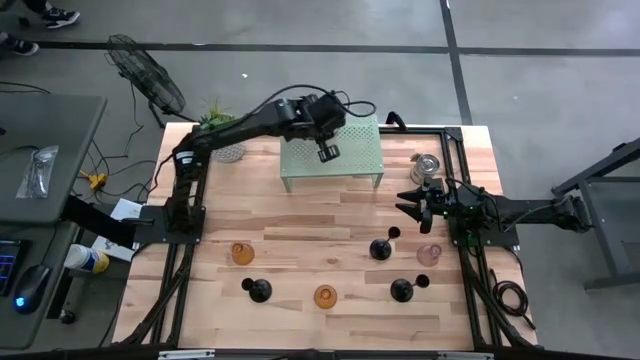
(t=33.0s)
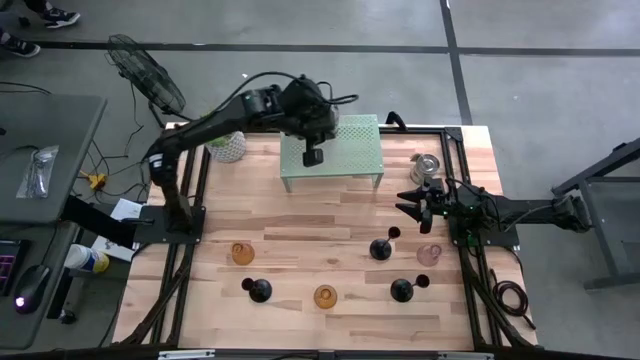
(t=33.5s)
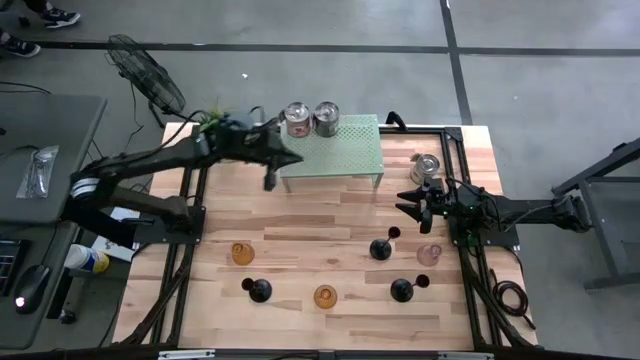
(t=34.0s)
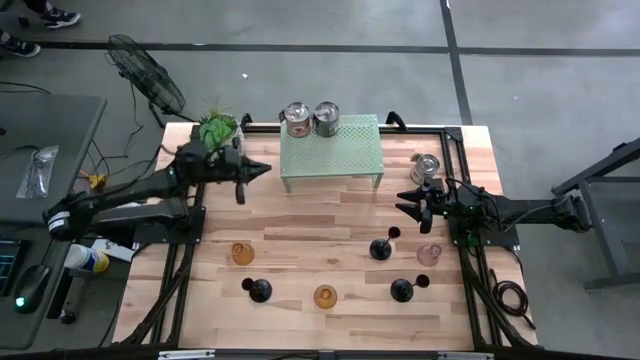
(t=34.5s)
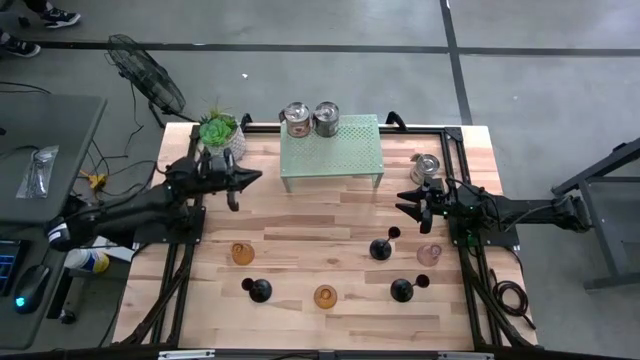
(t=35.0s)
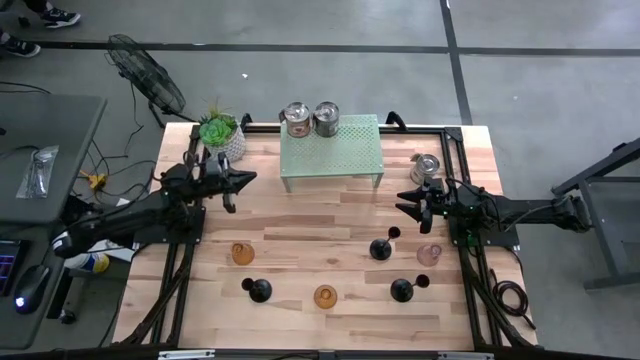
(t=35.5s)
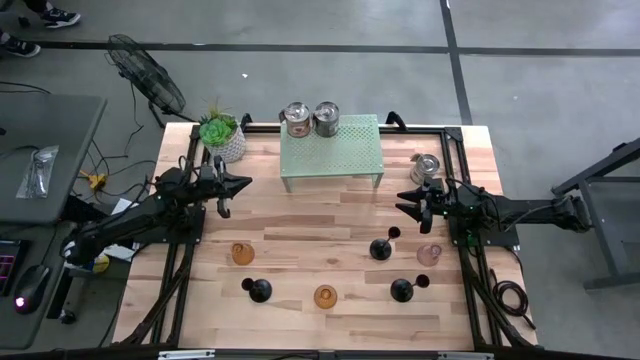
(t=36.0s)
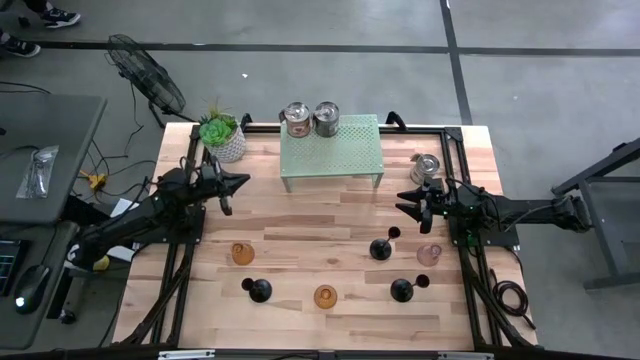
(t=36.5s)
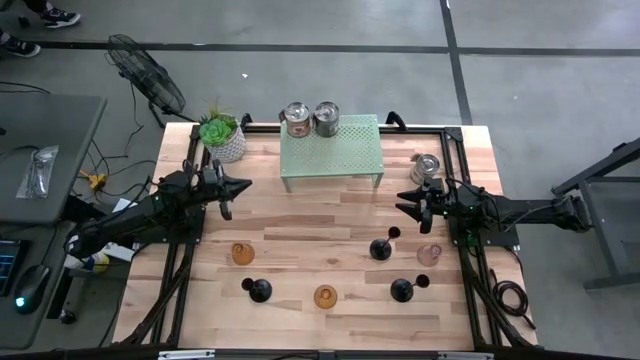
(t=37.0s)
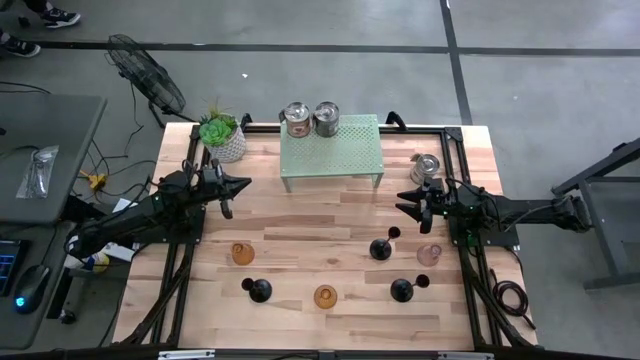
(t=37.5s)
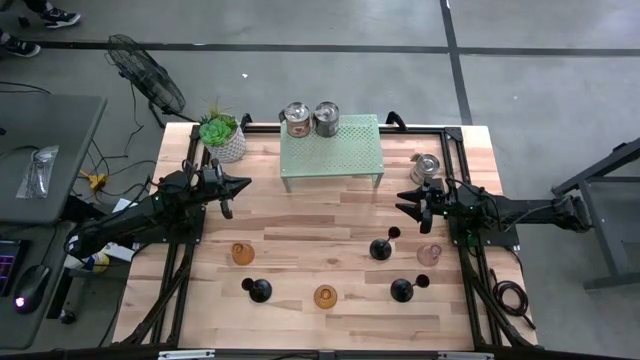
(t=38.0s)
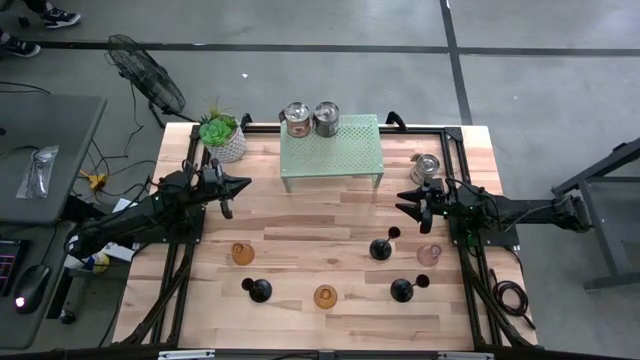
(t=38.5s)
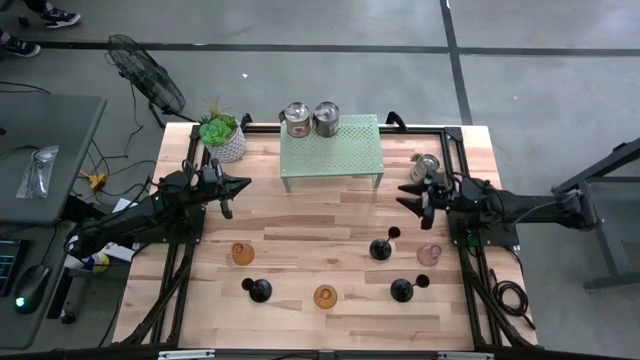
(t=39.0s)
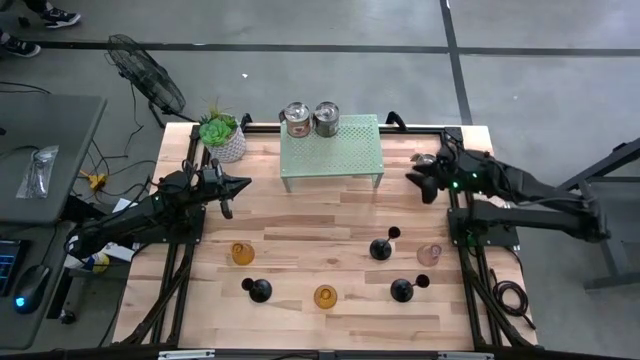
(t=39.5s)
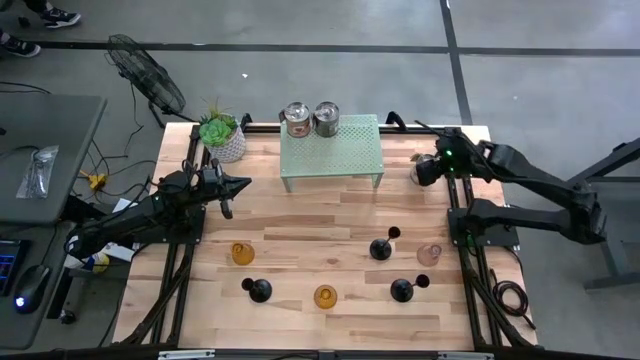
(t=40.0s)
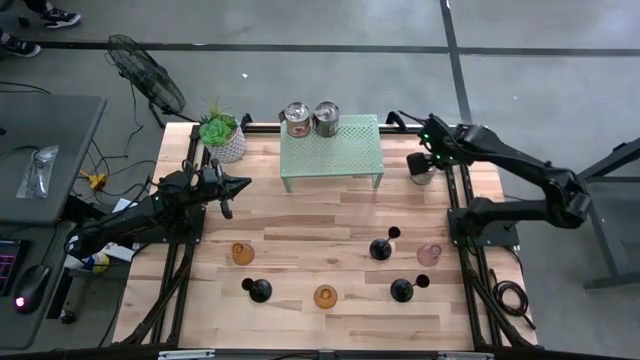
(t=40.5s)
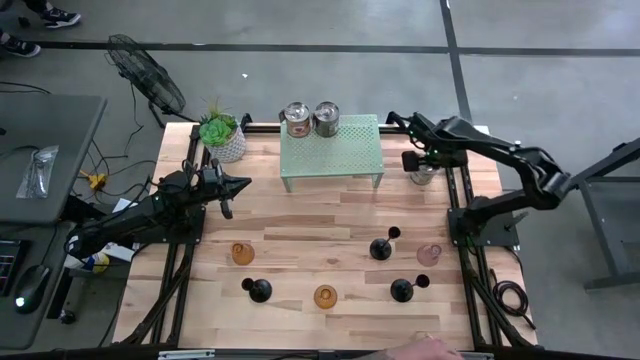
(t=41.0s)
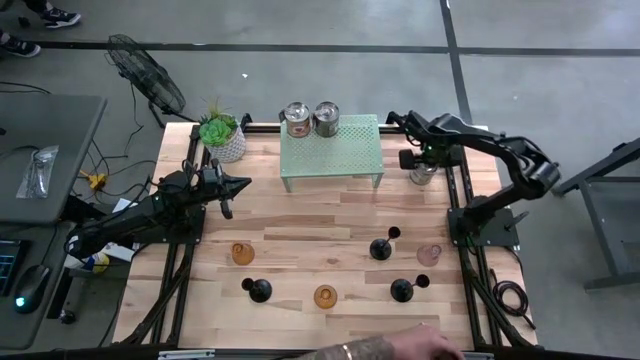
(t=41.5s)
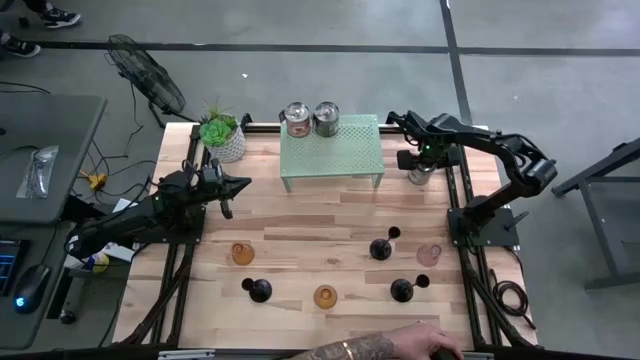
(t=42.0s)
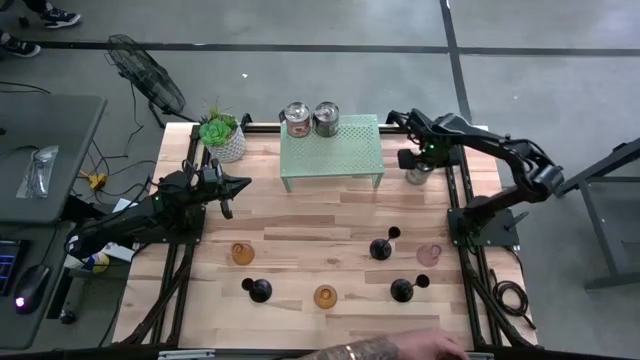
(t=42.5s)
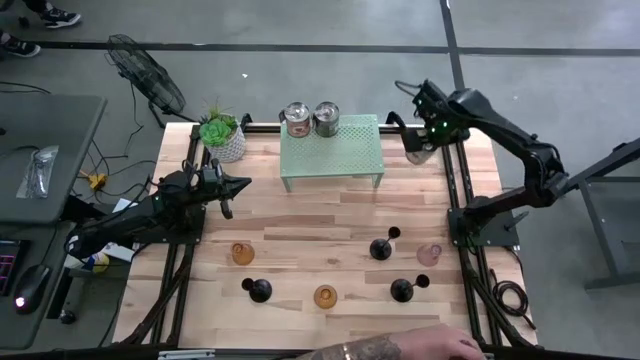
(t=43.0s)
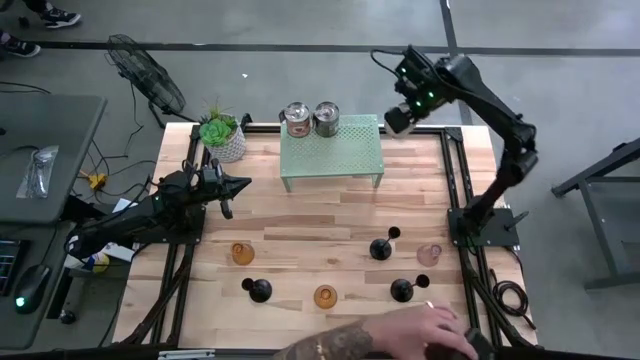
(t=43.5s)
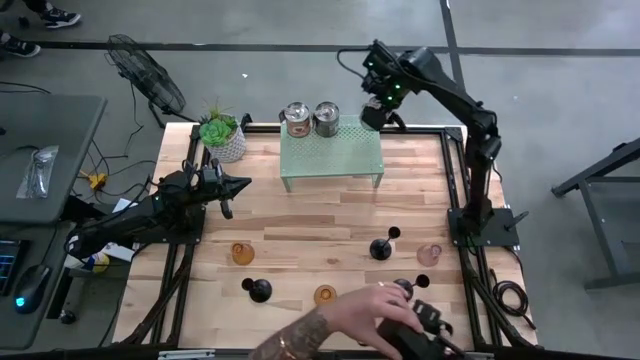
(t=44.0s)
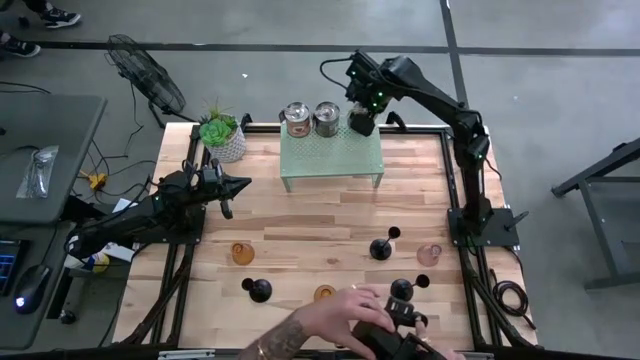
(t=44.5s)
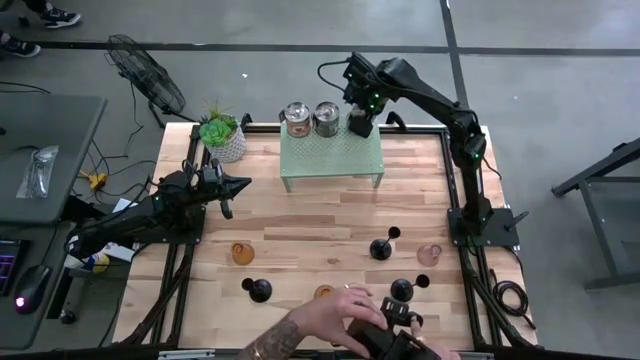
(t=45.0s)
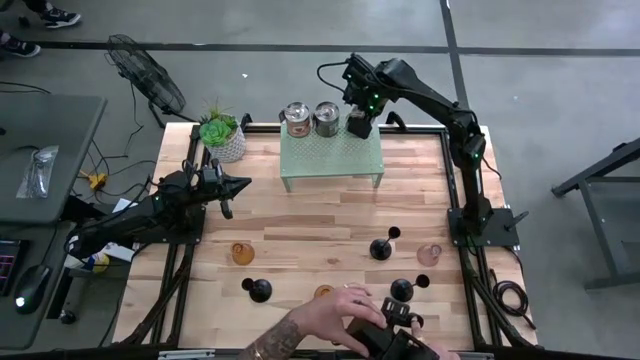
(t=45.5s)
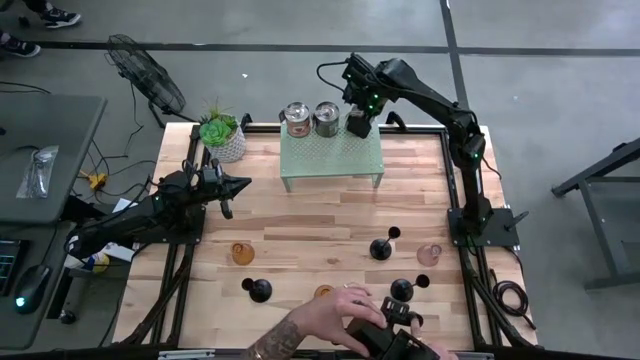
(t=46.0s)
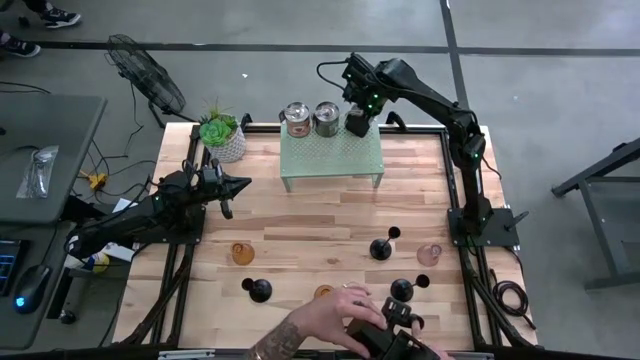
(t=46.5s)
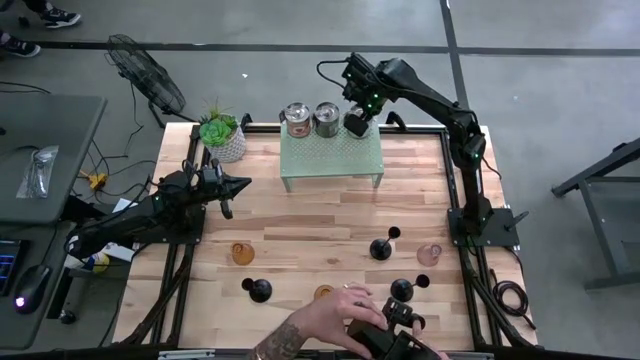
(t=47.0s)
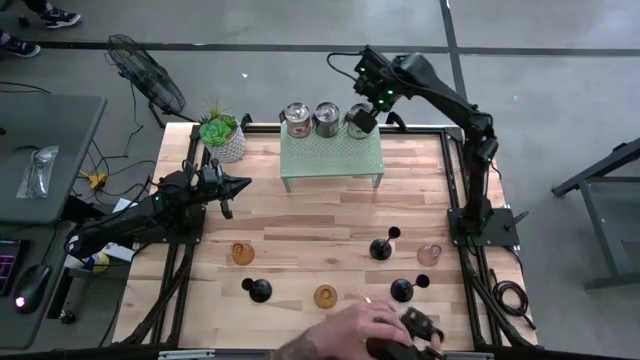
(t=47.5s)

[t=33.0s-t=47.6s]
Task: Pick & Place candle stick holders
Put the silver scented candle on the shelf
